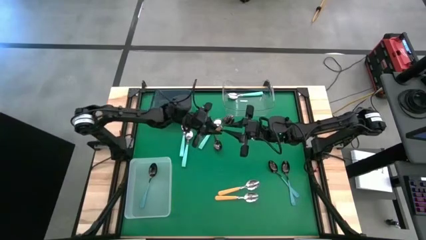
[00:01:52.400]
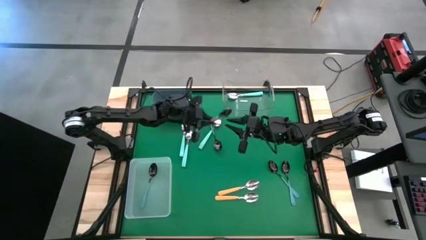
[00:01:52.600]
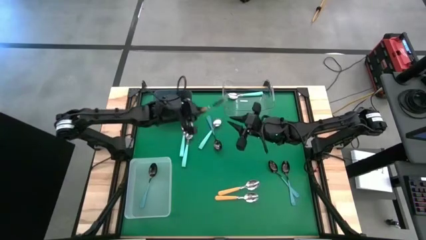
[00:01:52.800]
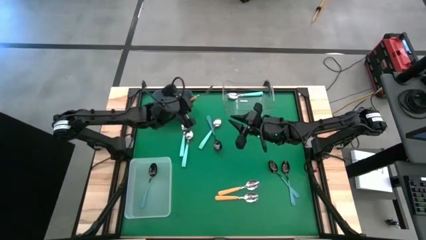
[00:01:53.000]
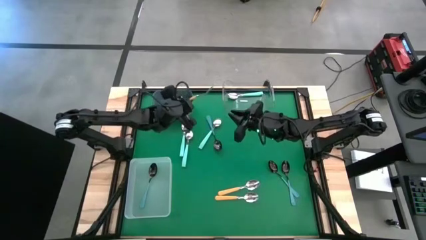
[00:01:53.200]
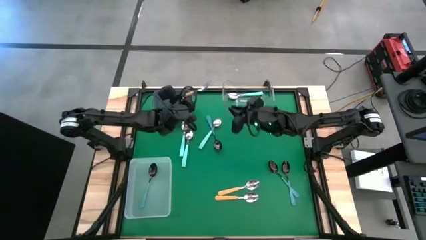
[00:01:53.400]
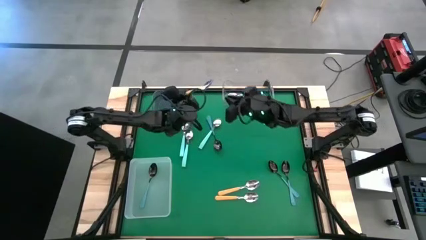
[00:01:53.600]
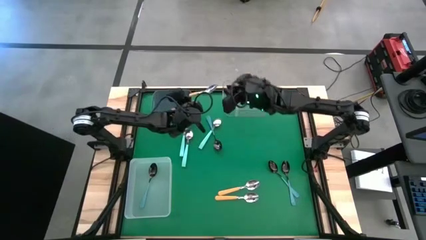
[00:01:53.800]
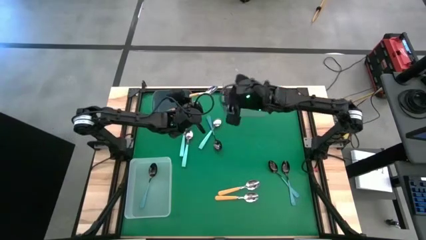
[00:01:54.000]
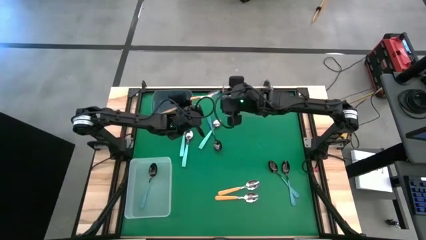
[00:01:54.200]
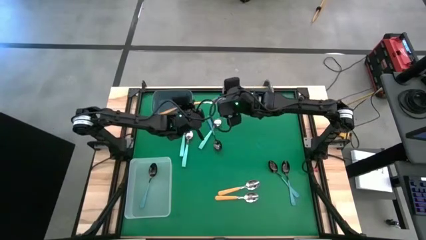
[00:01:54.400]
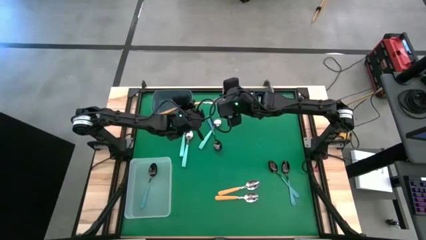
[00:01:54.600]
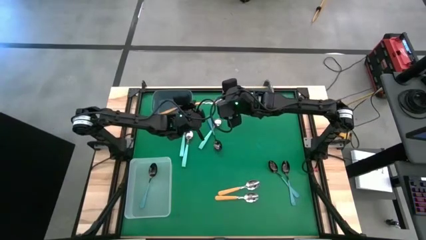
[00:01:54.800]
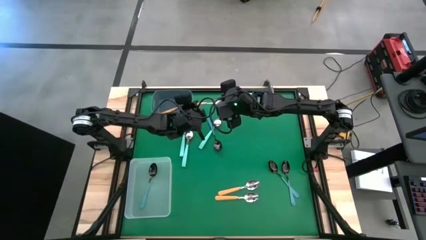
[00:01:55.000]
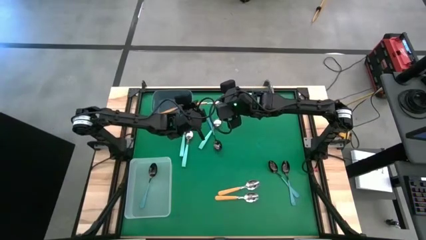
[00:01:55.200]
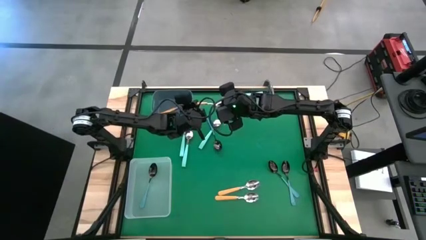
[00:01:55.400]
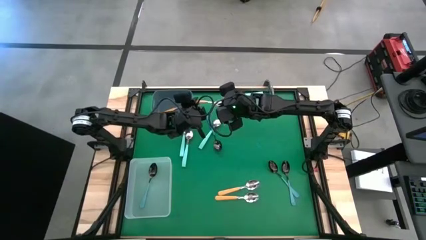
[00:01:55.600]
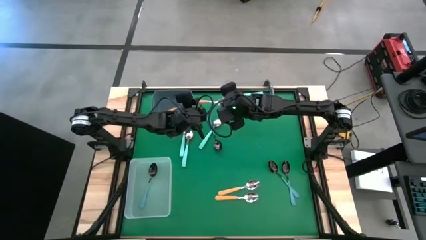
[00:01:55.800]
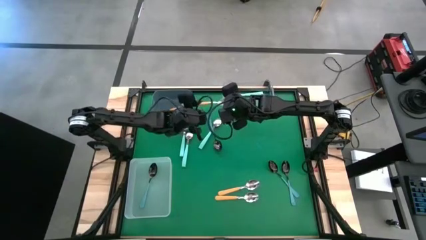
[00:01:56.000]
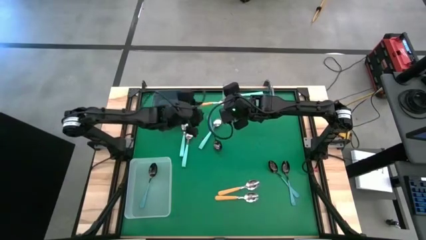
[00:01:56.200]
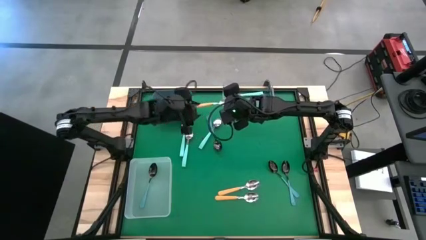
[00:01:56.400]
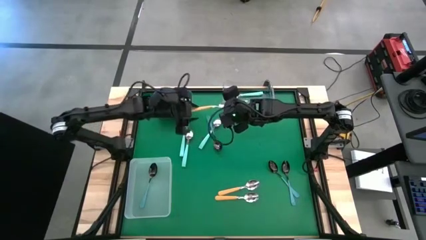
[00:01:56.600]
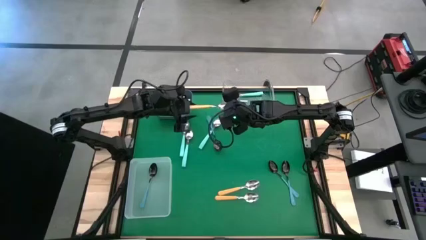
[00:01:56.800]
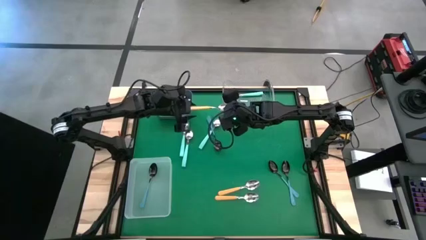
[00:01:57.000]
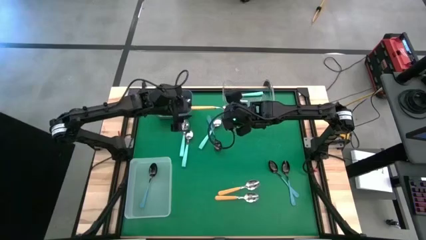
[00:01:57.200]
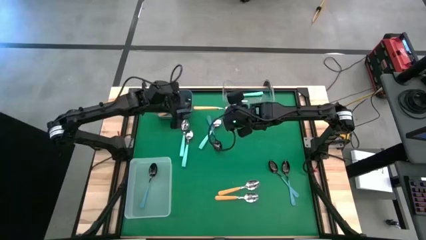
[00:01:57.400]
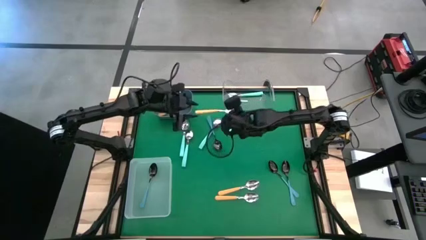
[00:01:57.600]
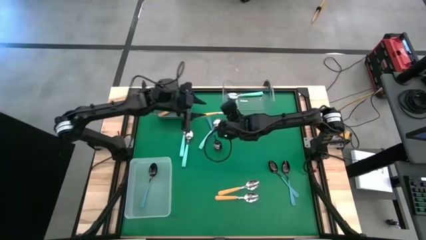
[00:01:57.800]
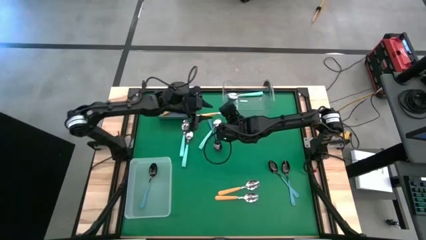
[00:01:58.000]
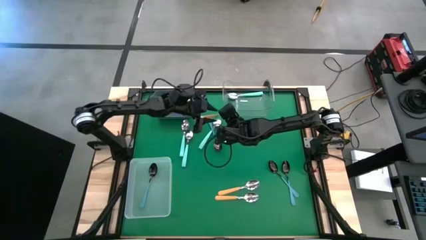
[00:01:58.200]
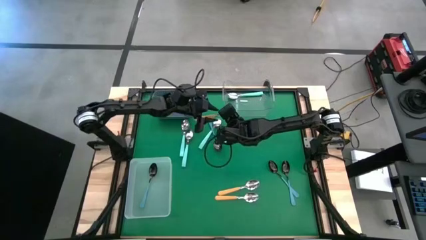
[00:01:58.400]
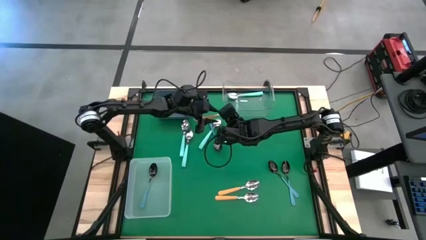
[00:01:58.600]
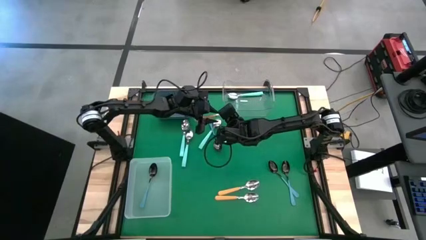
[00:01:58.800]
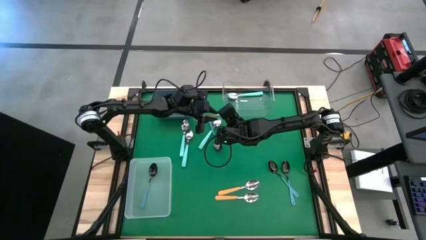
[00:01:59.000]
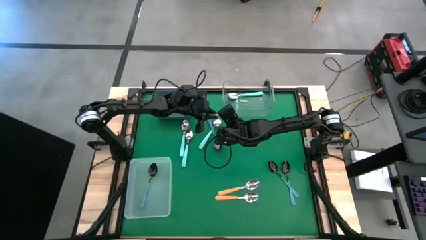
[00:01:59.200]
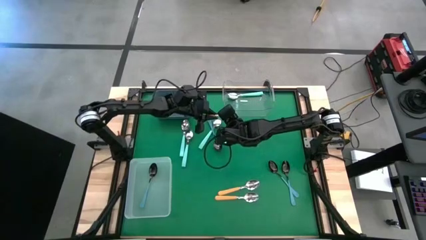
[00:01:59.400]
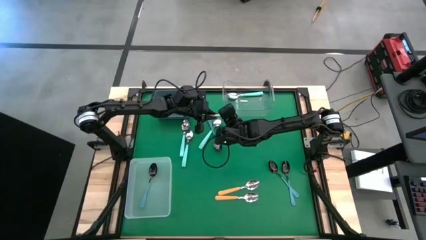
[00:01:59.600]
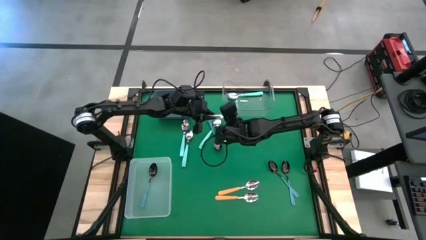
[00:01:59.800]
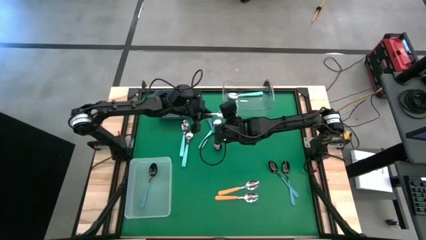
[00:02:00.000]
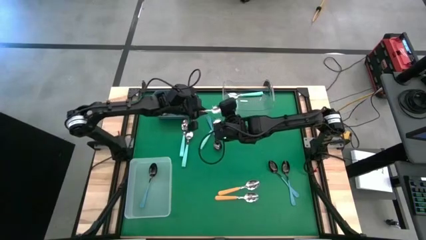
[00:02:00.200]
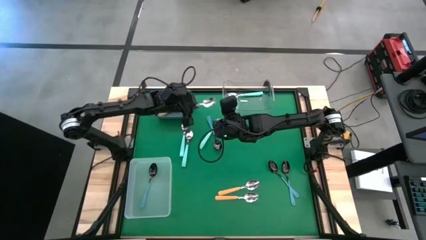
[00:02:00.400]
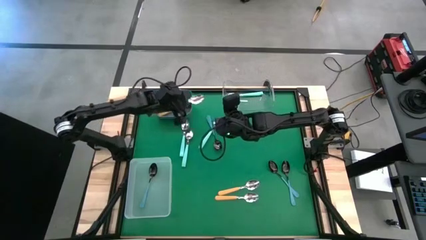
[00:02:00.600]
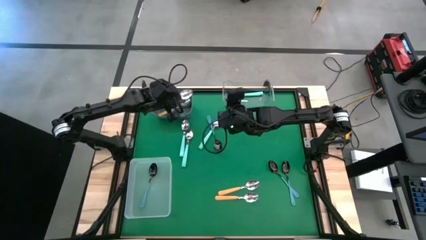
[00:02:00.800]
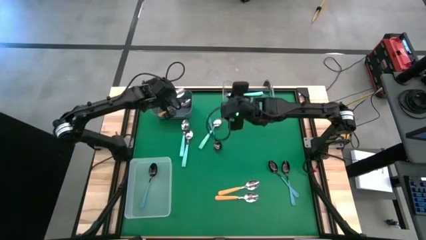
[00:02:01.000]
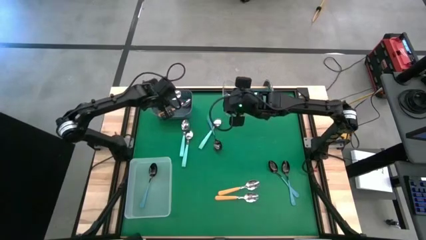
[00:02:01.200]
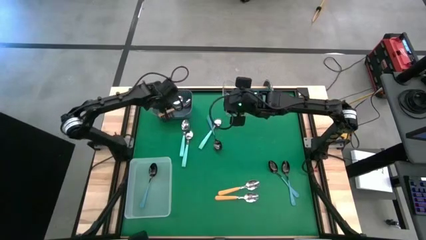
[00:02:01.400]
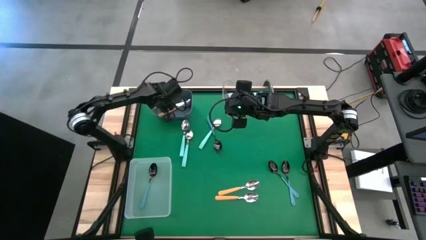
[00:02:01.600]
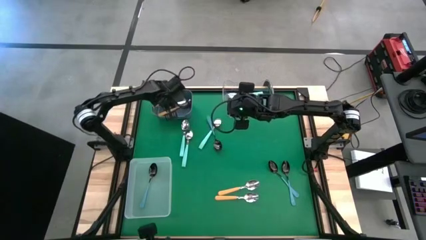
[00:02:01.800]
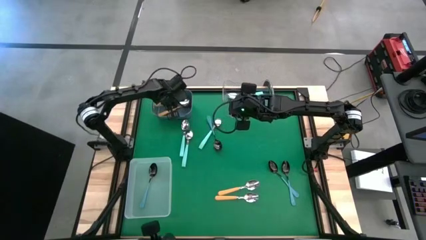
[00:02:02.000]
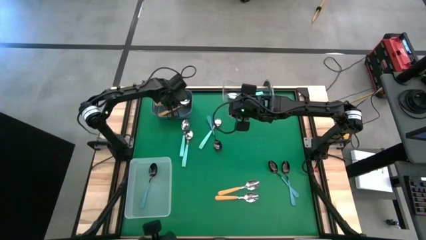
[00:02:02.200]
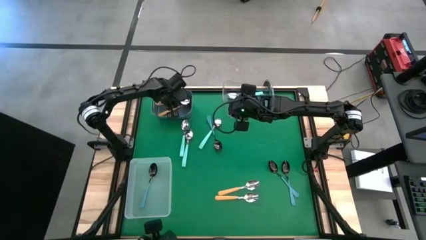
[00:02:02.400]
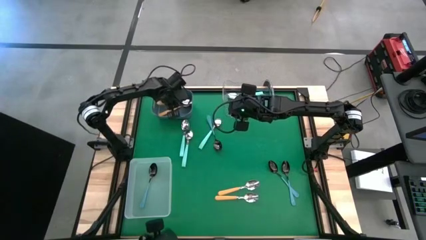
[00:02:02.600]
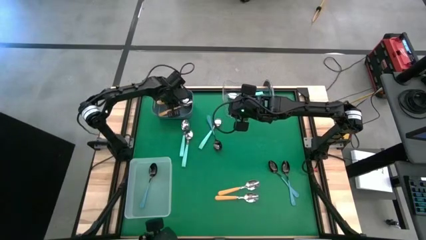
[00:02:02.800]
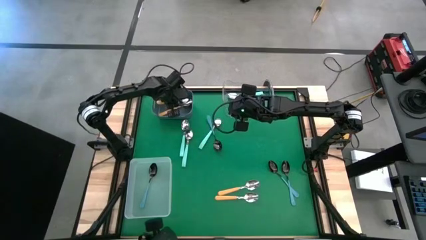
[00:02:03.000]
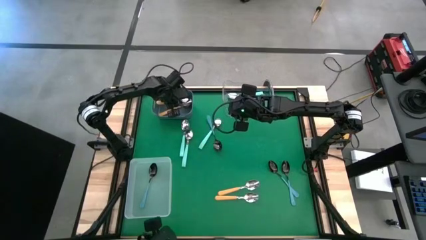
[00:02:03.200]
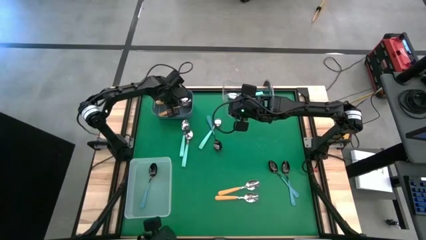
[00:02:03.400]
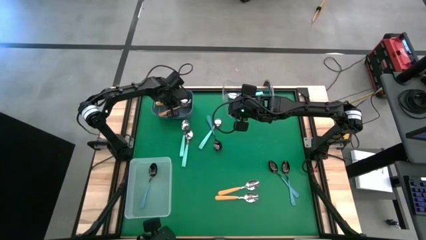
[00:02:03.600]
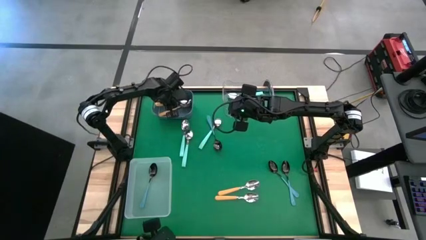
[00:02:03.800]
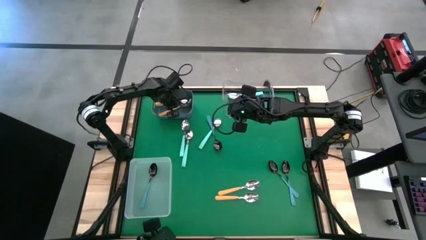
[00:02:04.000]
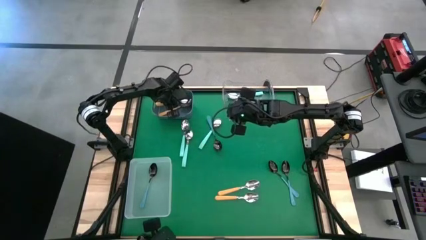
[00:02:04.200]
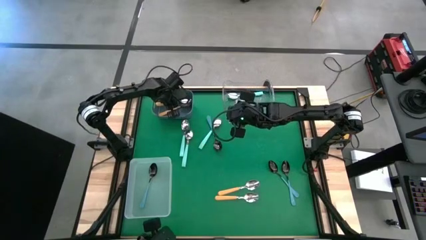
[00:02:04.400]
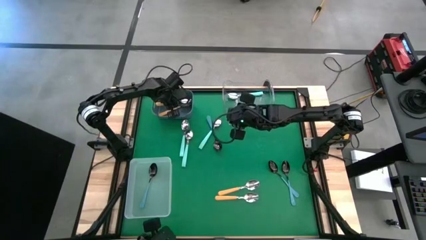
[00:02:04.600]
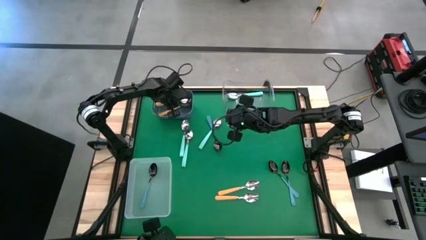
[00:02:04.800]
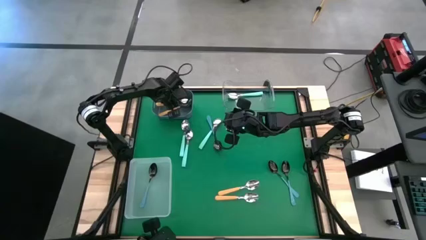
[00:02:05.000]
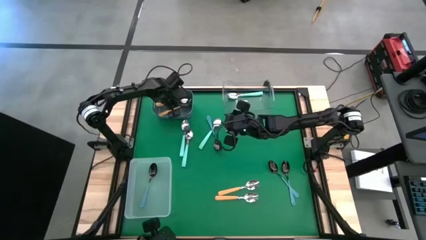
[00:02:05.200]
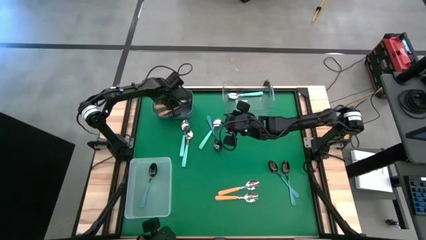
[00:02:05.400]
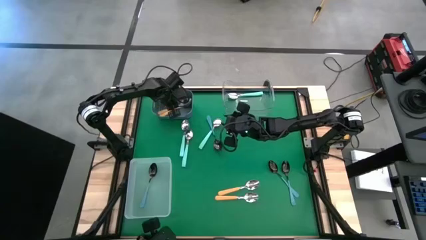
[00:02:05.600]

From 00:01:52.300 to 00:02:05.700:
Task: Sort silverware by color (type)
Put the yellow spoon into the gray bin

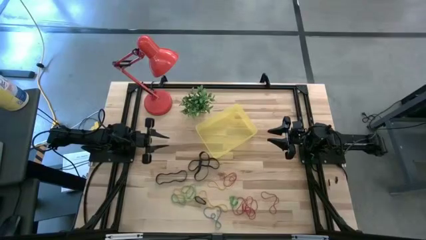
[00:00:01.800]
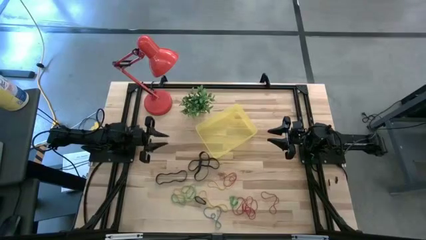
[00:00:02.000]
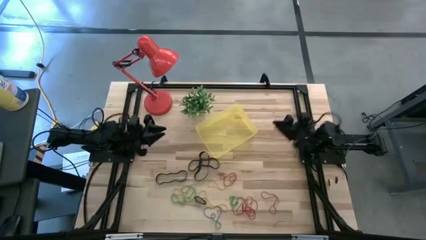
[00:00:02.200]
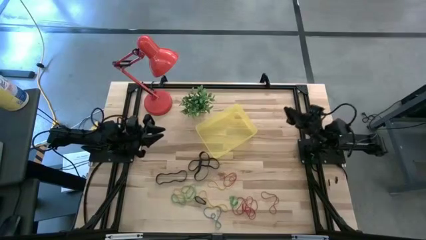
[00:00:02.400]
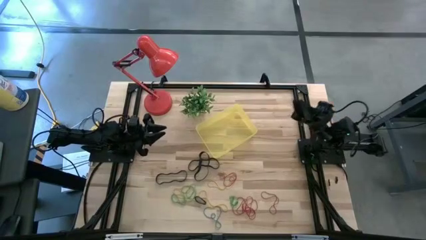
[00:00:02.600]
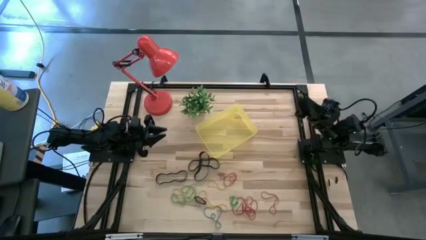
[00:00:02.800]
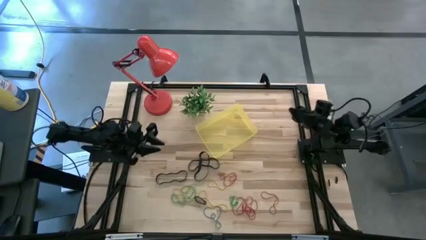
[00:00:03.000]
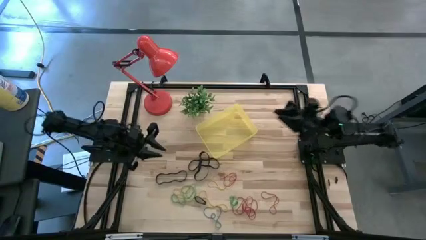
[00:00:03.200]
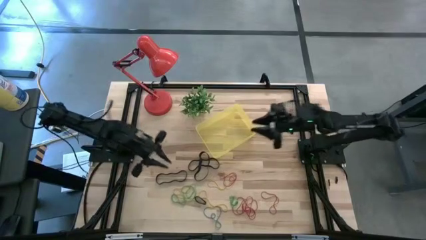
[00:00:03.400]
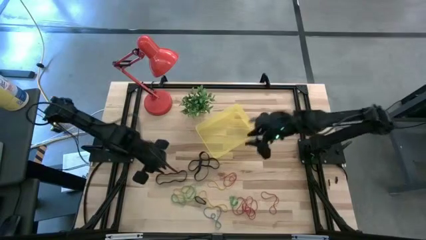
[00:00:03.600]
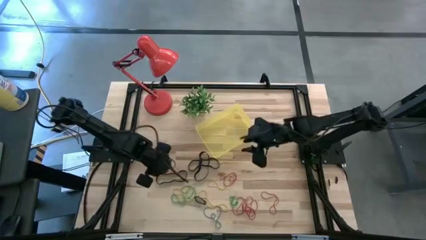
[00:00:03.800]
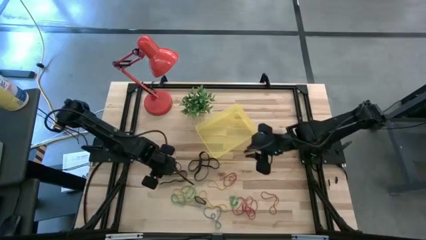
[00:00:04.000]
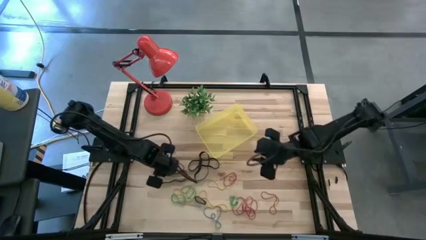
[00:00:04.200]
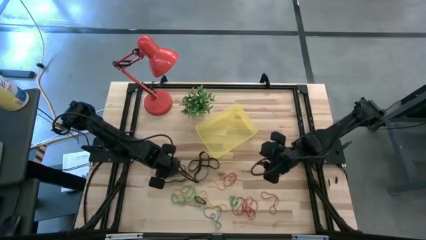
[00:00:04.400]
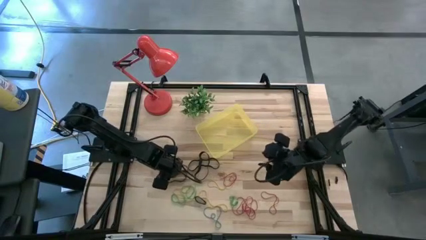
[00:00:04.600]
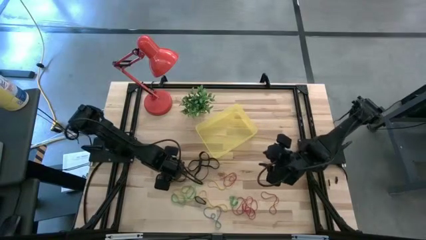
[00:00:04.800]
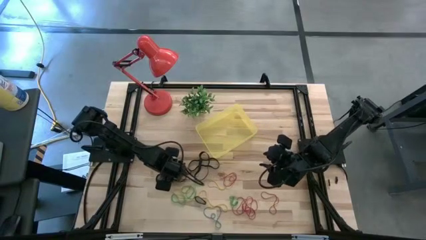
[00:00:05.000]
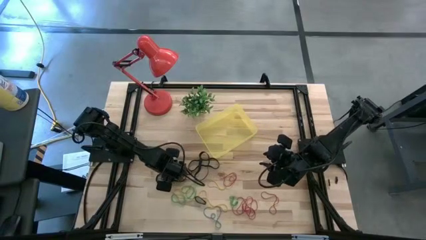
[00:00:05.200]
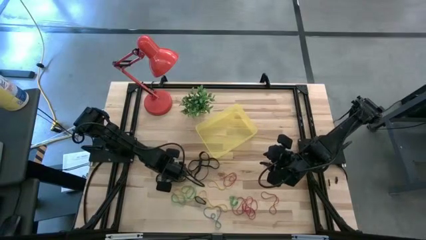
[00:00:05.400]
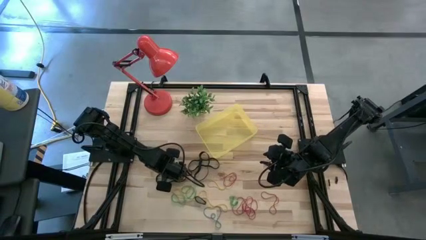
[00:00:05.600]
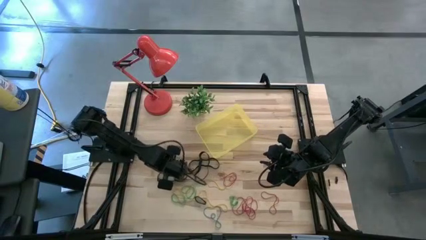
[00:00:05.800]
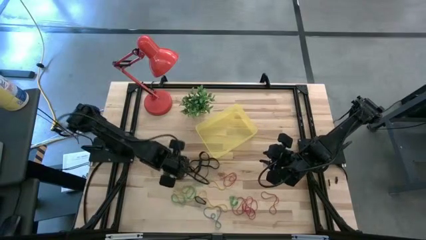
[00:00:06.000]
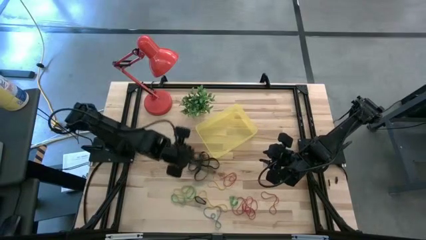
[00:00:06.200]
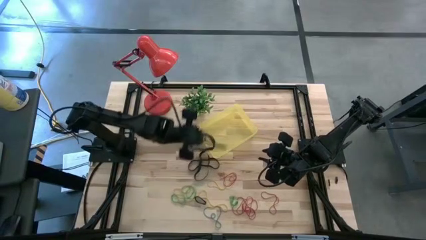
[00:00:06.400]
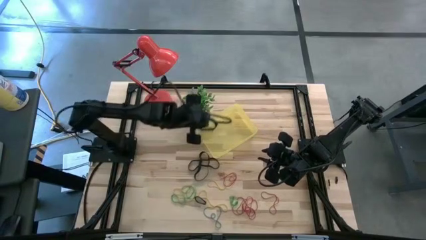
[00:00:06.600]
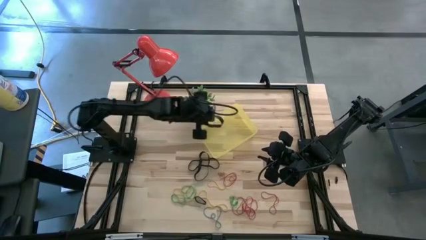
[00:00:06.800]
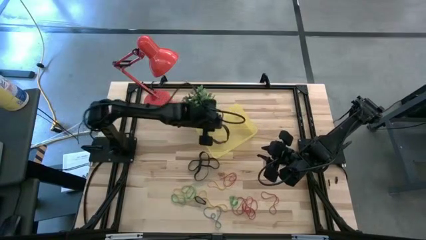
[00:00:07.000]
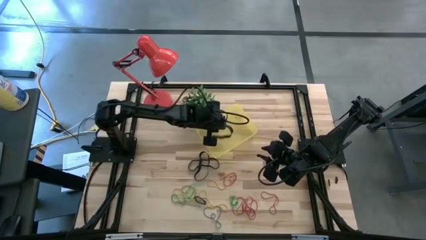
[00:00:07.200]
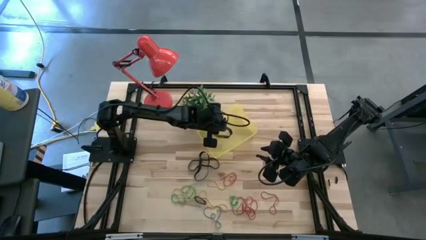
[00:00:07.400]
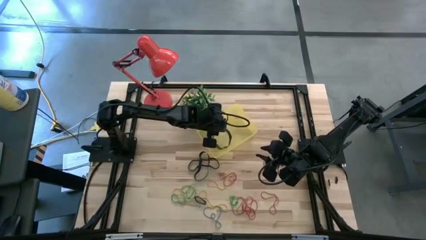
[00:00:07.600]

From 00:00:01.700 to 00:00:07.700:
Task: Pick and place rubber bands into bin
Put the black rubber band into the transparent yellow bin
